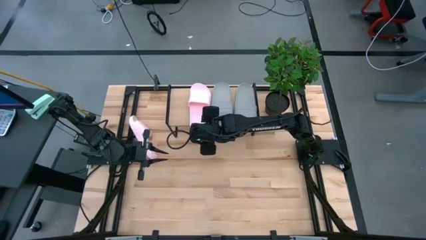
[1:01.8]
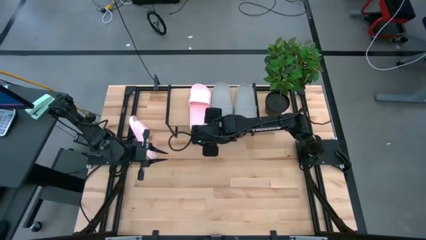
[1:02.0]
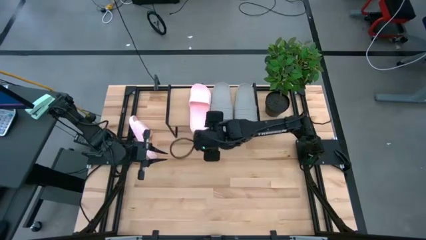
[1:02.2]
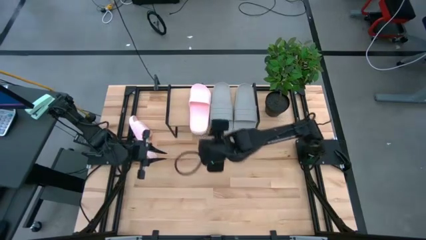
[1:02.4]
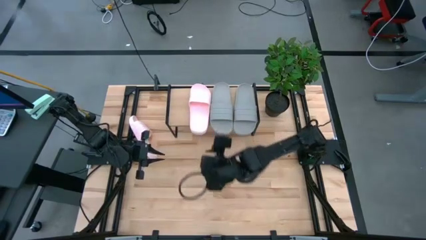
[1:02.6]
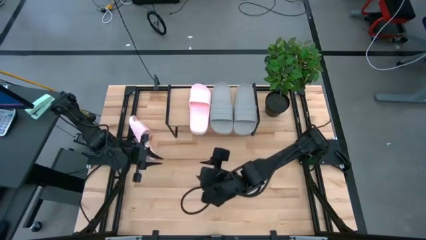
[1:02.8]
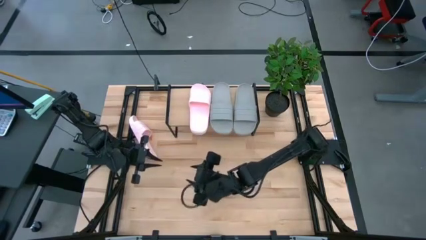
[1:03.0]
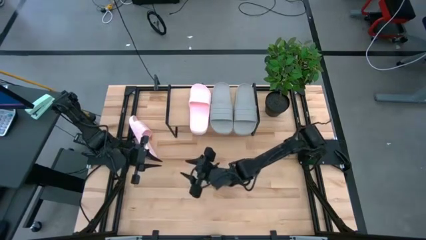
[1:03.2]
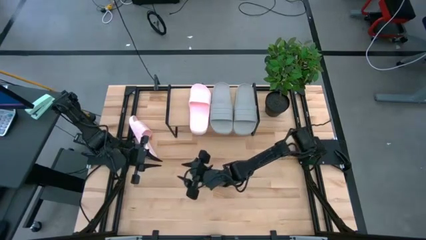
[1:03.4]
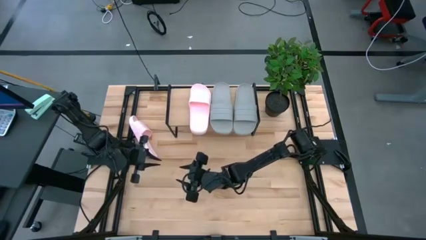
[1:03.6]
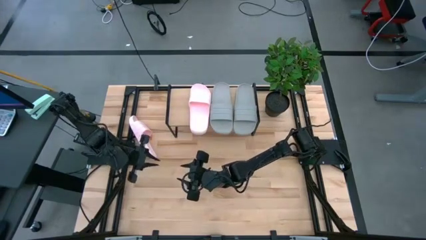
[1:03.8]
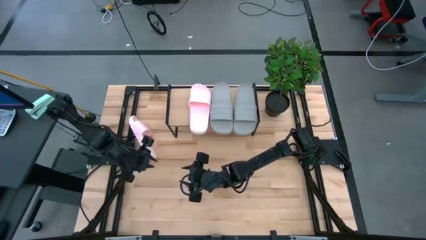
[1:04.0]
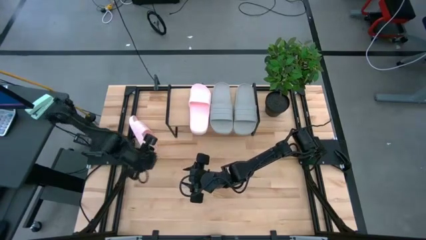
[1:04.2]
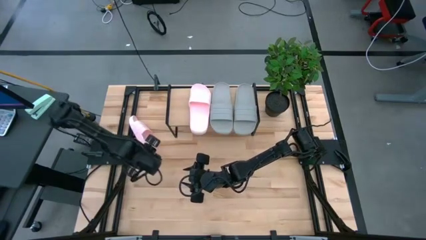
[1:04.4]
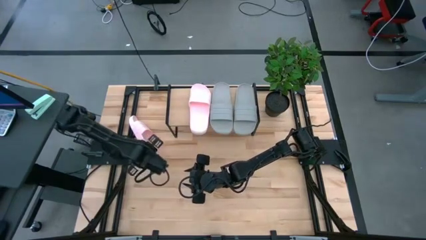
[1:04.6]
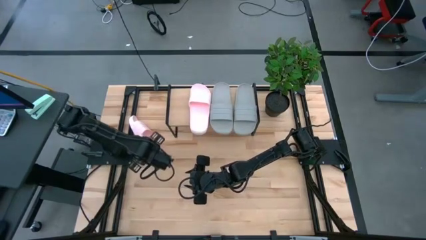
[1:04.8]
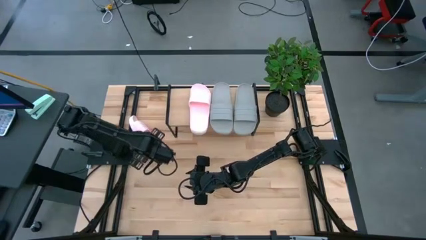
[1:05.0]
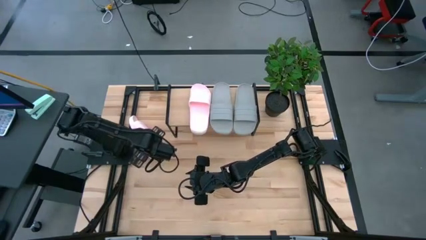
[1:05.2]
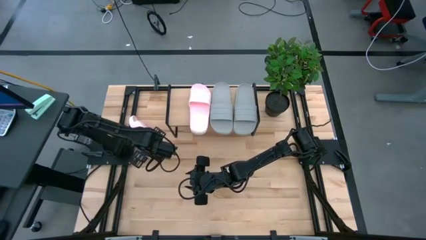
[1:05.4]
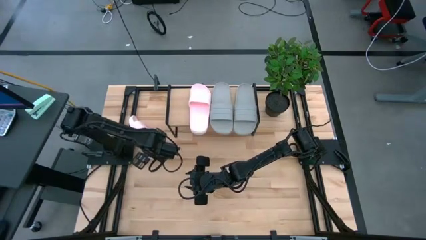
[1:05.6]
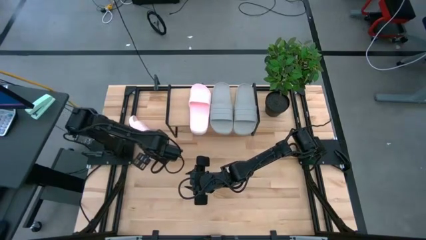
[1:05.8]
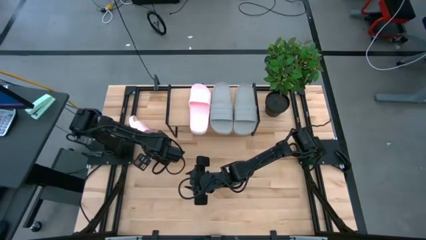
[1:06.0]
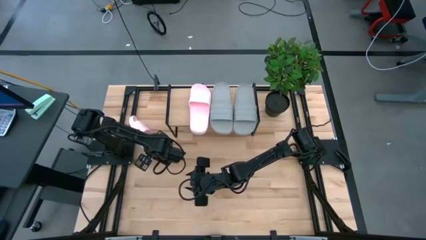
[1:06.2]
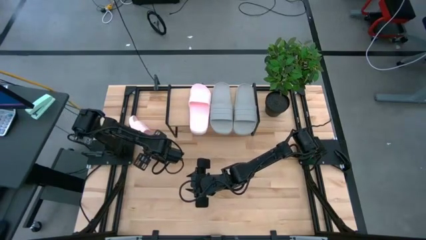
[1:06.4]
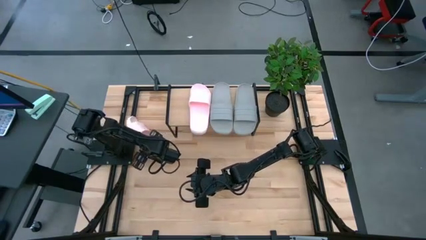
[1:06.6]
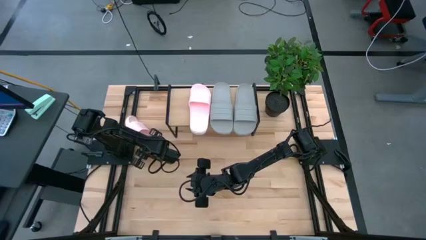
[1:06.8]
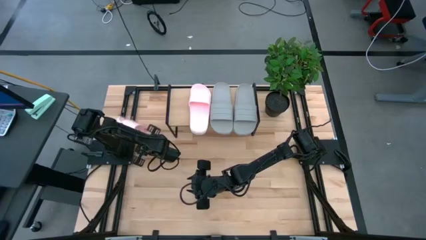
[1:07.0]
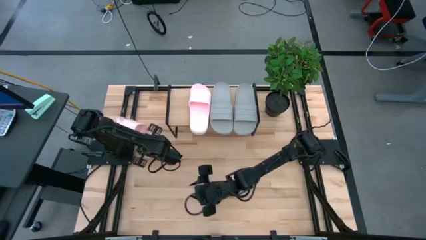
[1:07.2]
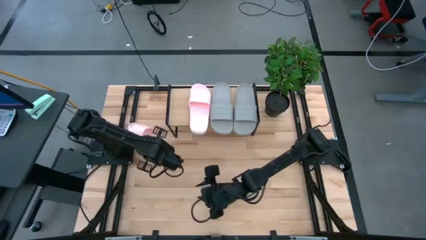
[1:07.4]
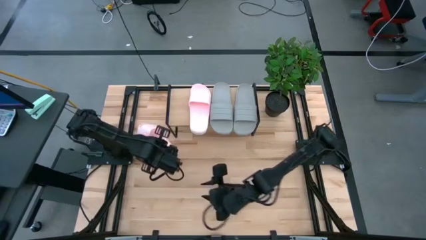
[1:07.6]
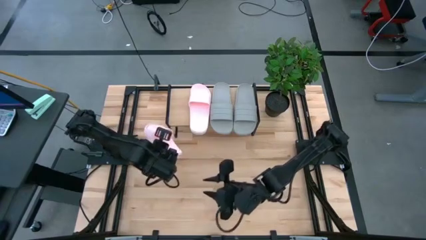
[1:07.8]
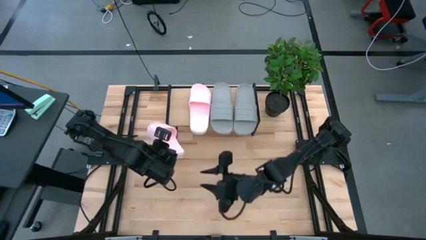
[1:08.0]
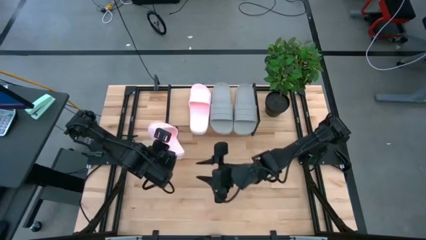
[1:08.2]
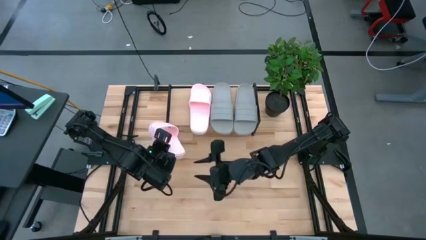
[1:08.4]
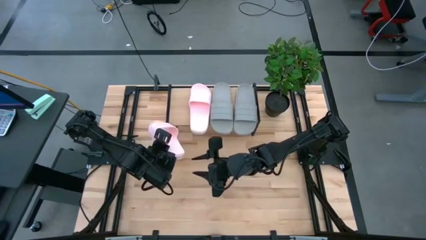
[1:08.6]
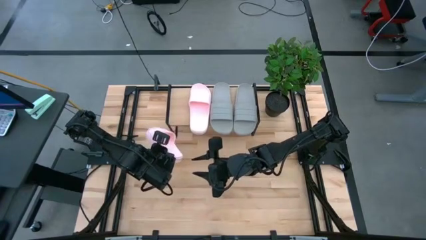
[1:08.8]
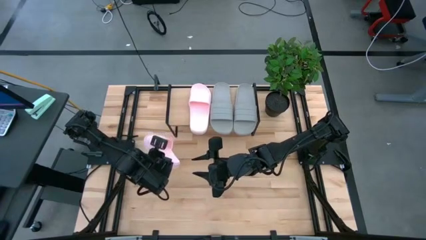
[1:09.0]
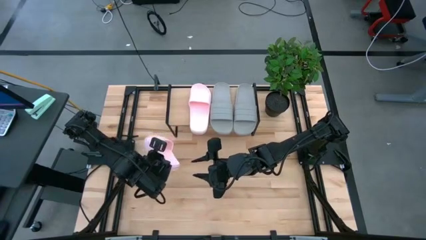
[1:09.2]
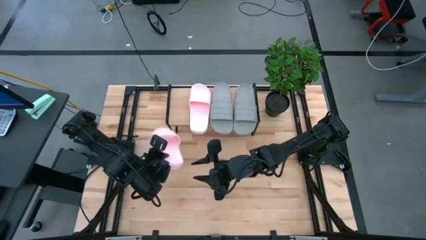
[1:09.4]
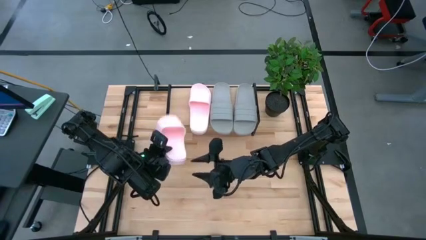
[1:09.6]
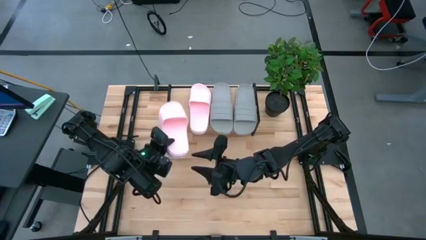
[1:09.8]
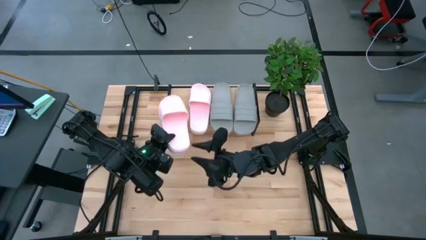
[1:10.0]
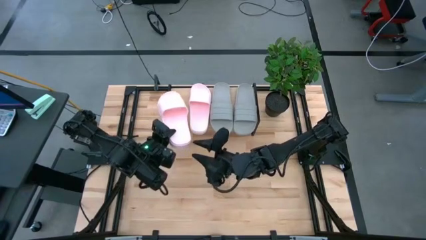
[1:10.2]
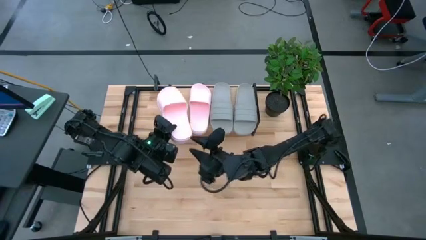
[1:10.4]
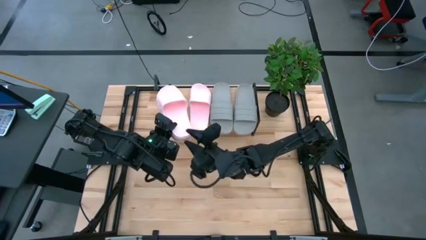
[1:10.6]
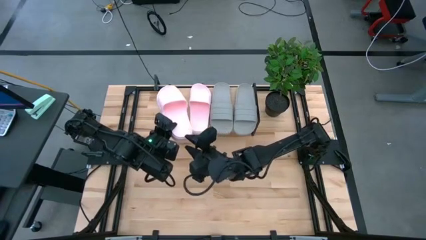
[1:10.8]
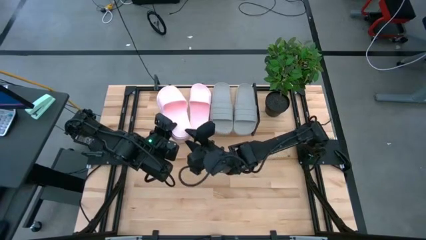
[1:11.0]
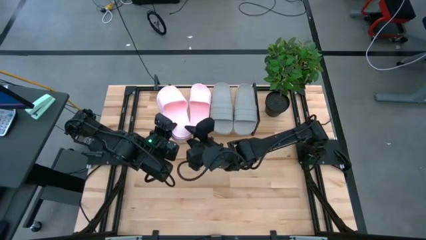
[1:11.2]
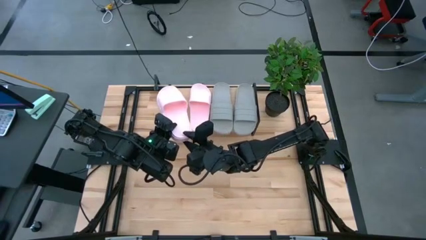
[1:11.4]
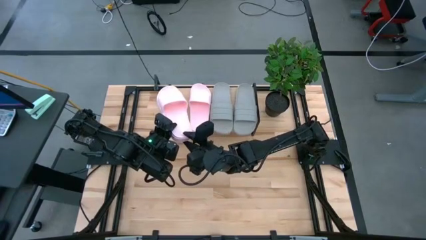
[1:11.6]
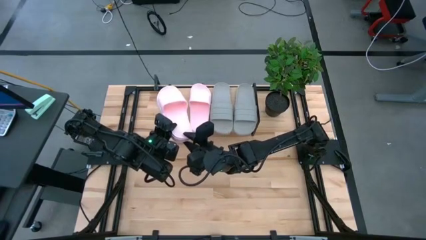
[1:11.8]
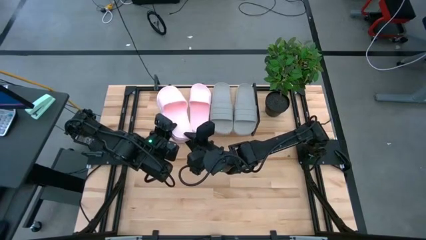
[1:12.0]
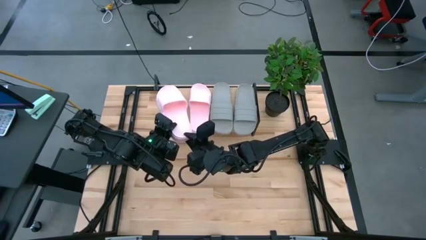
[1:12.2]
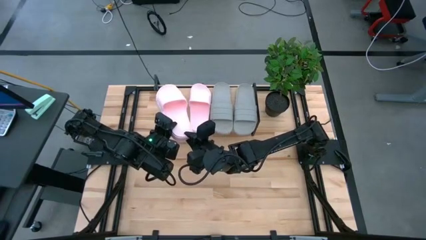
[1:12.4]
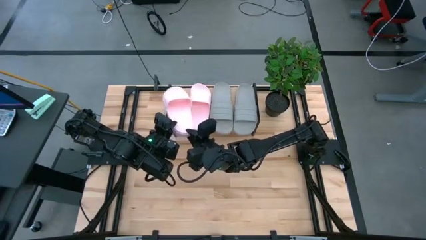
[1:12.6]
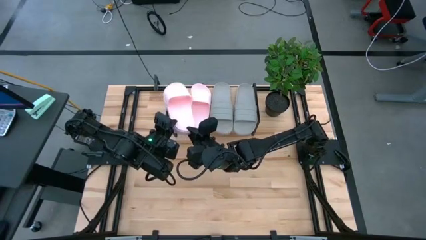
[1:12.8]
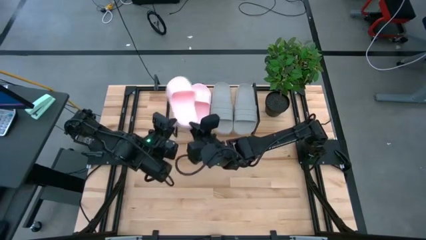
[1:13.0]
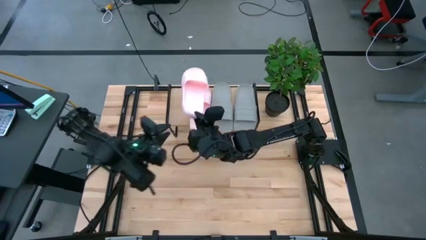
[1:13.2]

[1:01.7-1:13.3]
Task: Pick and place slides into the shelf
Put the pink slide onto the shelf
